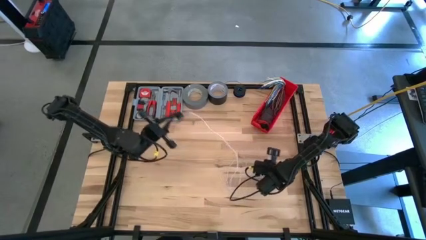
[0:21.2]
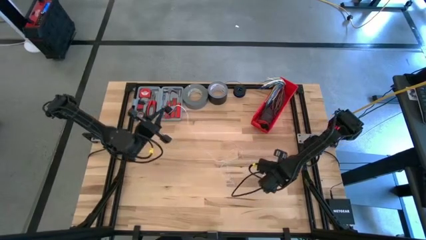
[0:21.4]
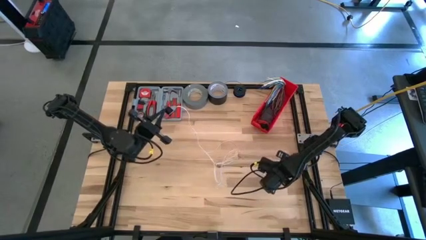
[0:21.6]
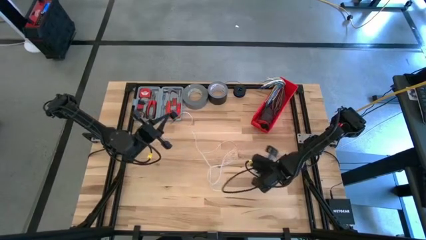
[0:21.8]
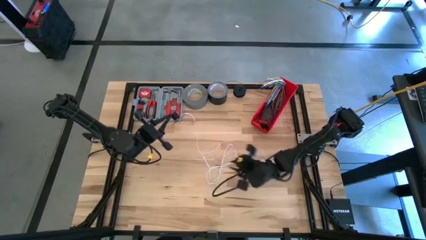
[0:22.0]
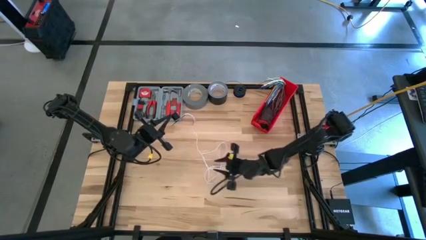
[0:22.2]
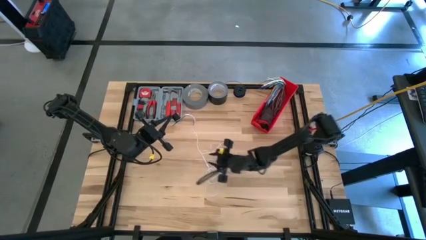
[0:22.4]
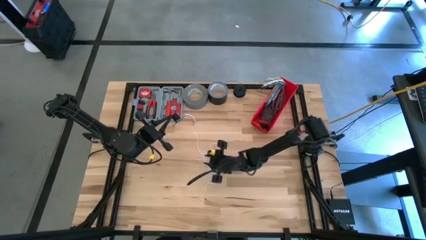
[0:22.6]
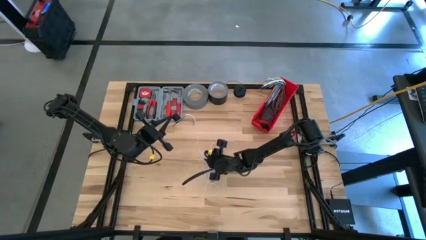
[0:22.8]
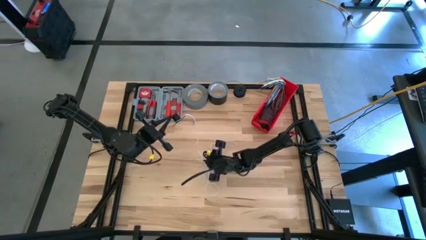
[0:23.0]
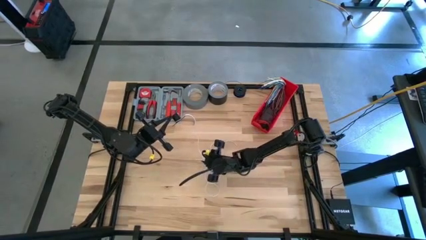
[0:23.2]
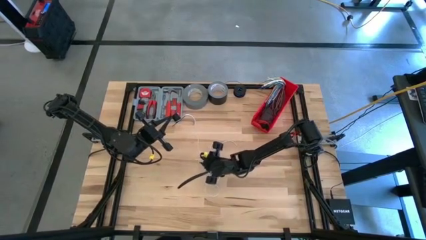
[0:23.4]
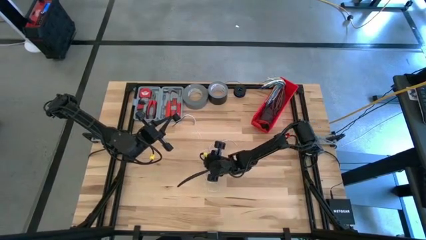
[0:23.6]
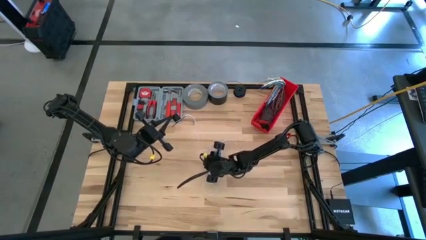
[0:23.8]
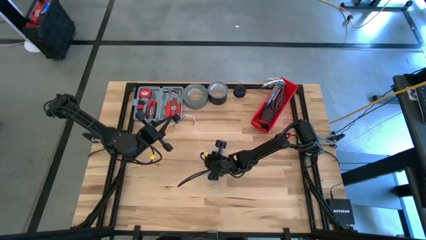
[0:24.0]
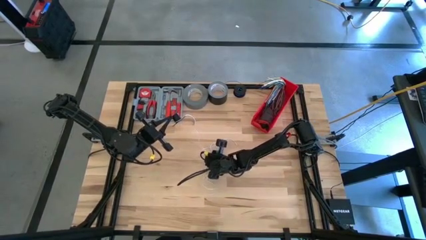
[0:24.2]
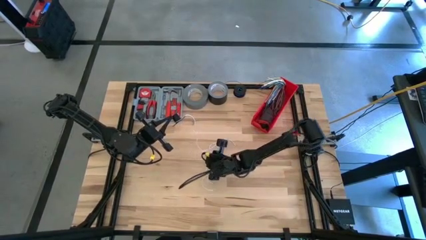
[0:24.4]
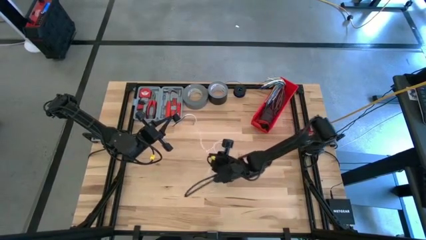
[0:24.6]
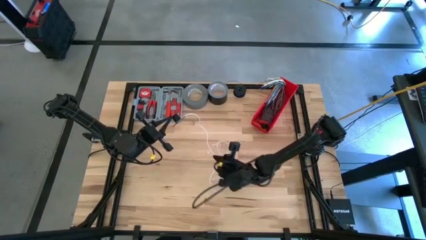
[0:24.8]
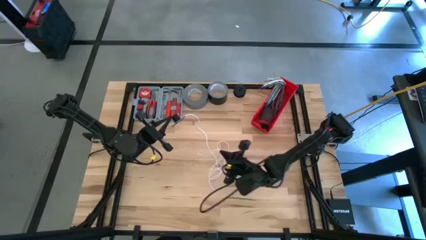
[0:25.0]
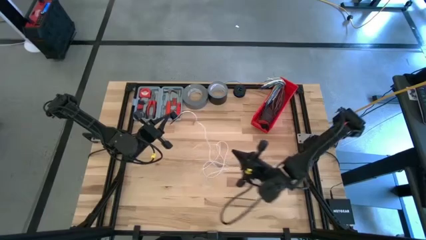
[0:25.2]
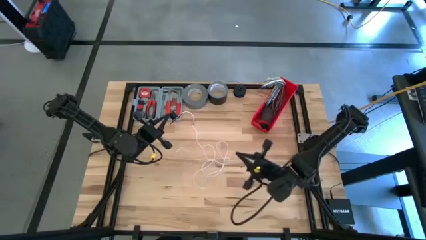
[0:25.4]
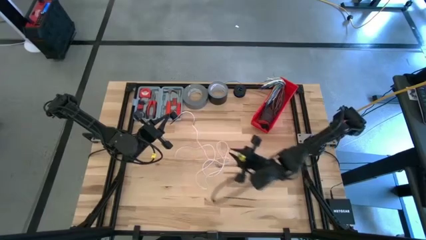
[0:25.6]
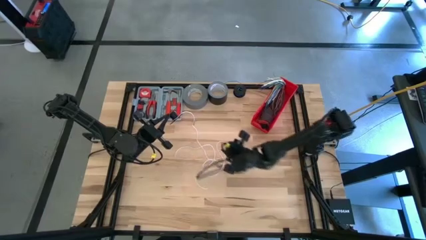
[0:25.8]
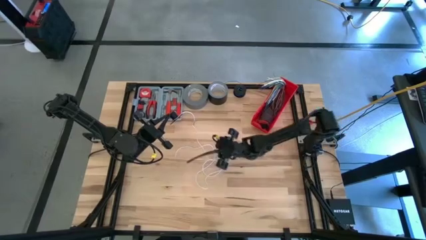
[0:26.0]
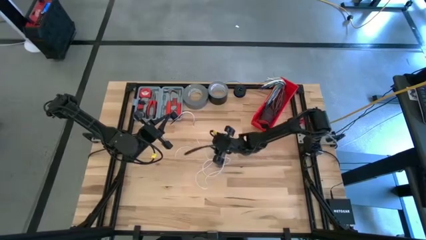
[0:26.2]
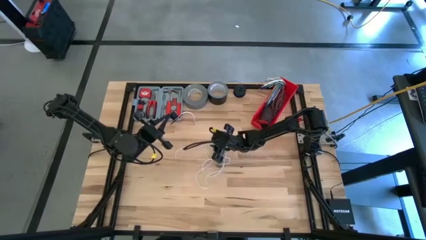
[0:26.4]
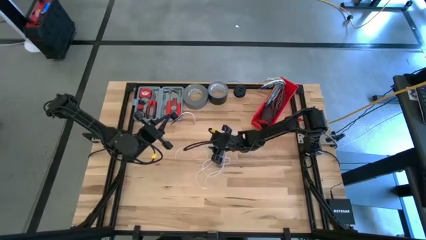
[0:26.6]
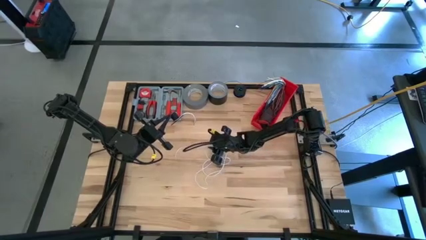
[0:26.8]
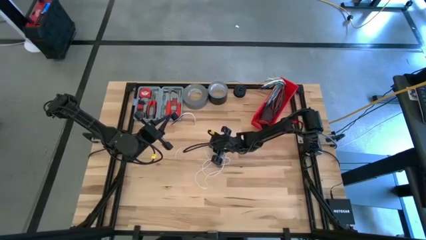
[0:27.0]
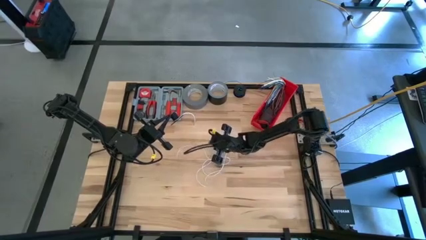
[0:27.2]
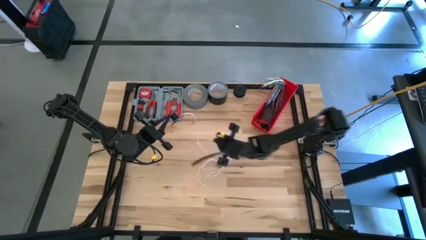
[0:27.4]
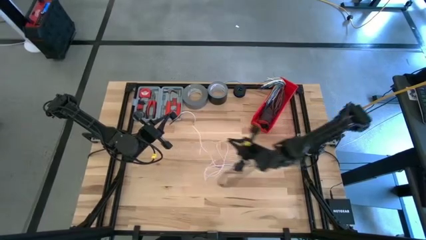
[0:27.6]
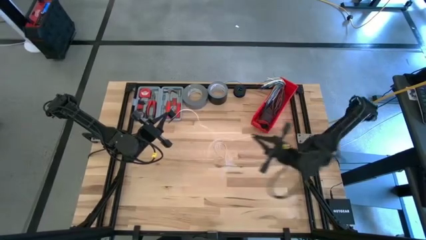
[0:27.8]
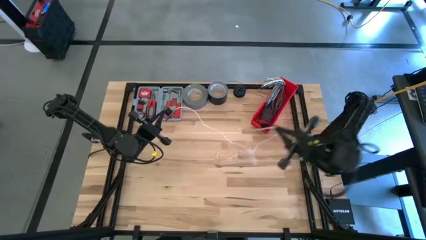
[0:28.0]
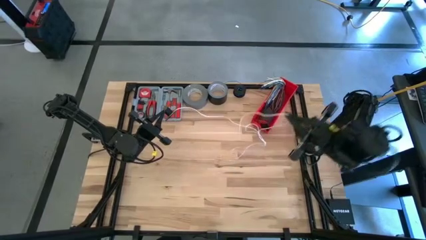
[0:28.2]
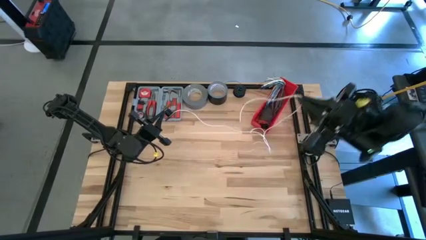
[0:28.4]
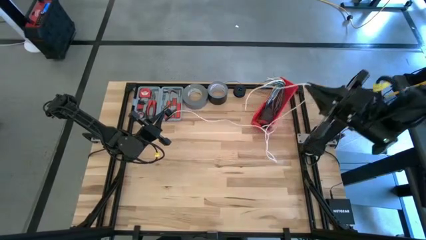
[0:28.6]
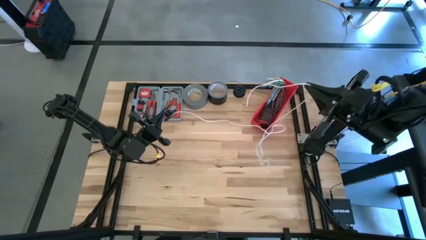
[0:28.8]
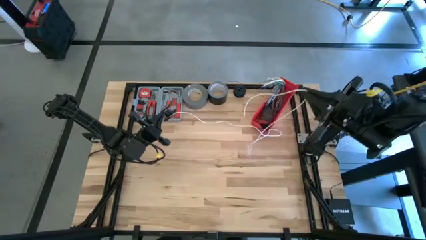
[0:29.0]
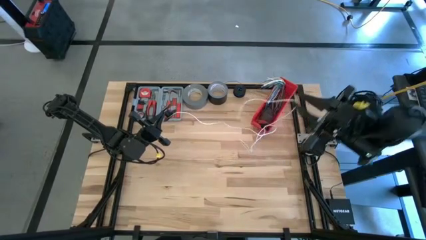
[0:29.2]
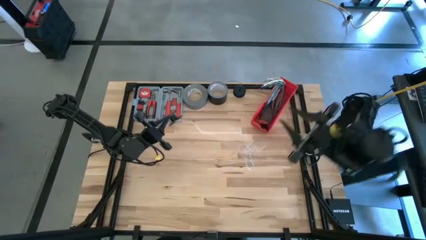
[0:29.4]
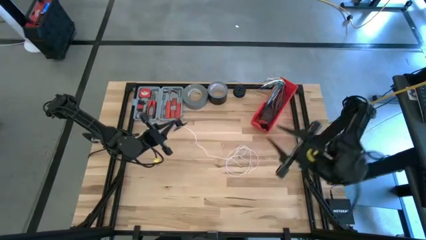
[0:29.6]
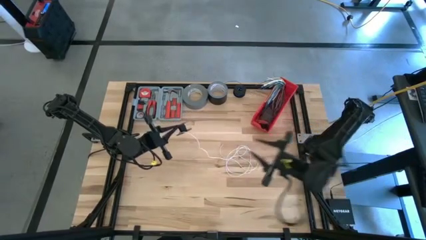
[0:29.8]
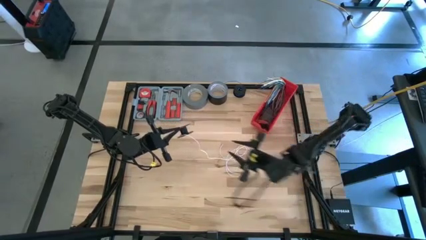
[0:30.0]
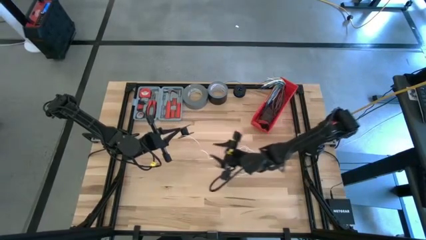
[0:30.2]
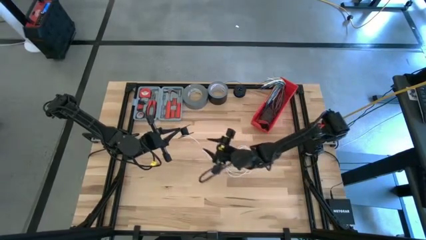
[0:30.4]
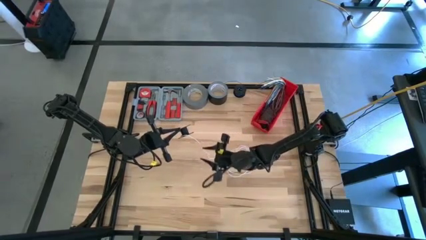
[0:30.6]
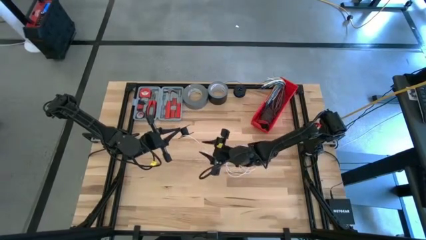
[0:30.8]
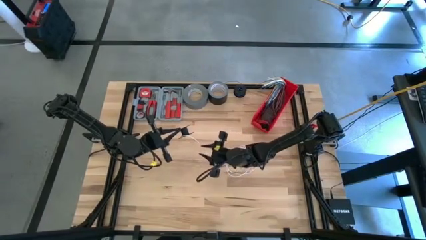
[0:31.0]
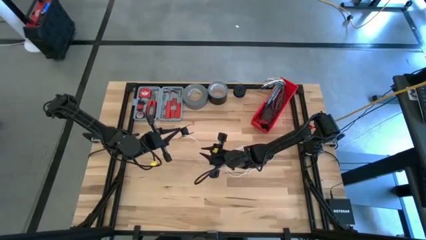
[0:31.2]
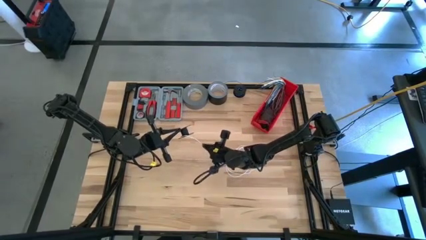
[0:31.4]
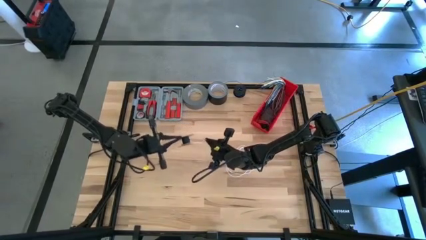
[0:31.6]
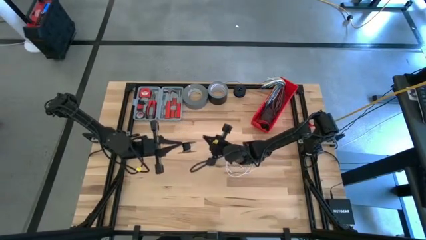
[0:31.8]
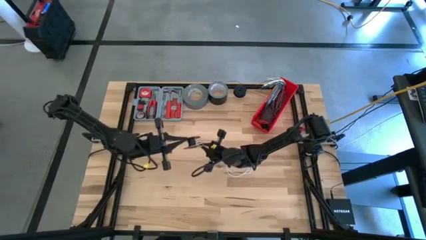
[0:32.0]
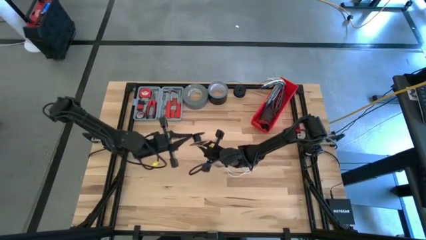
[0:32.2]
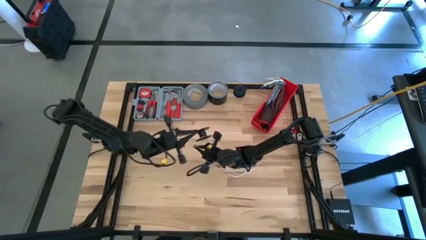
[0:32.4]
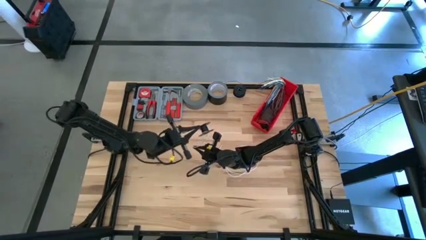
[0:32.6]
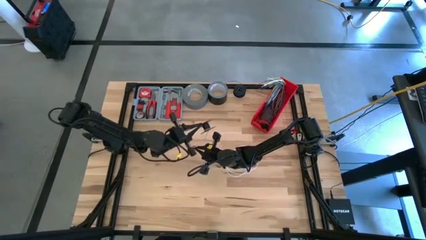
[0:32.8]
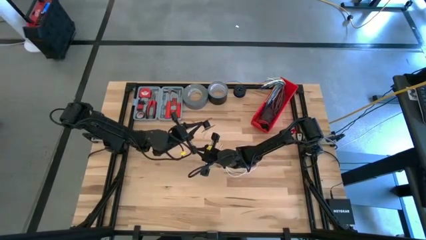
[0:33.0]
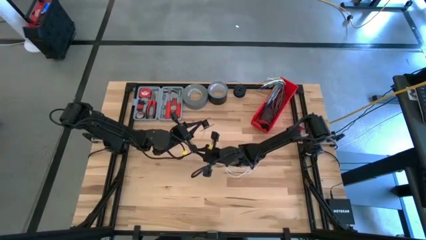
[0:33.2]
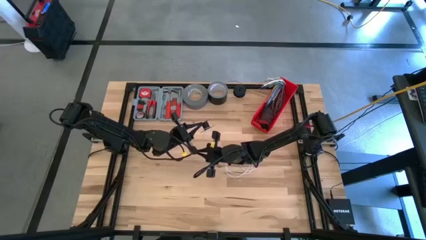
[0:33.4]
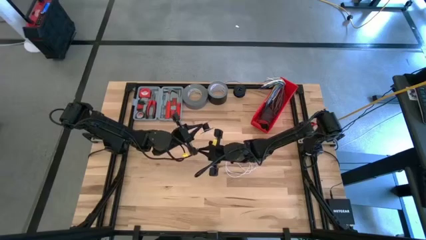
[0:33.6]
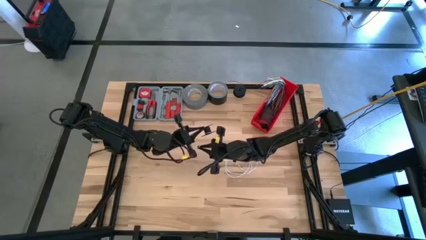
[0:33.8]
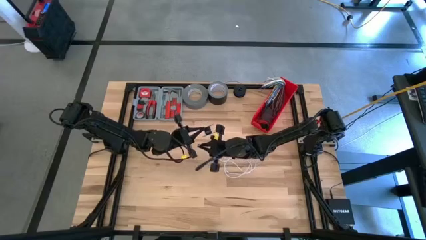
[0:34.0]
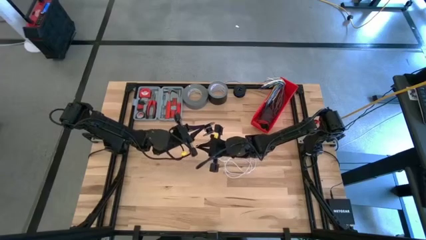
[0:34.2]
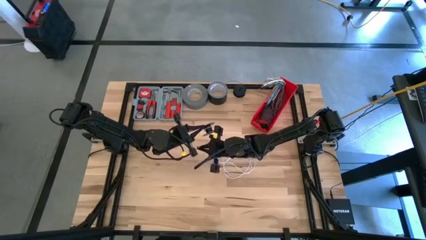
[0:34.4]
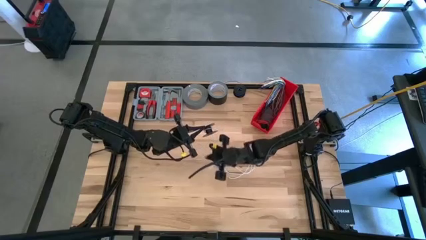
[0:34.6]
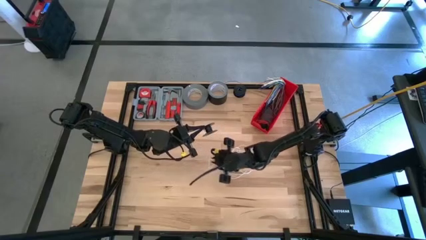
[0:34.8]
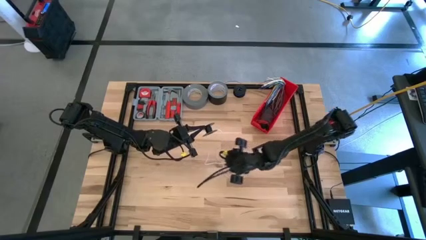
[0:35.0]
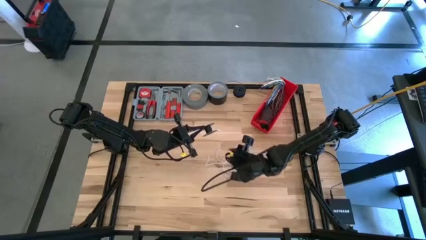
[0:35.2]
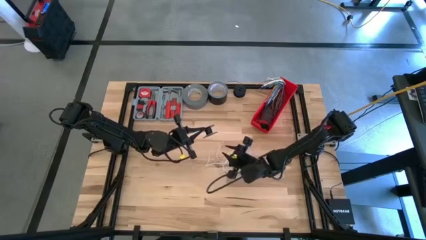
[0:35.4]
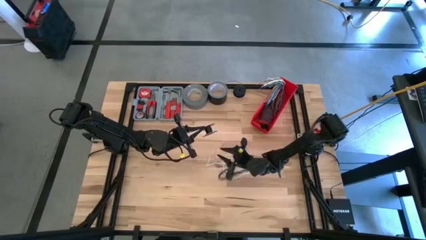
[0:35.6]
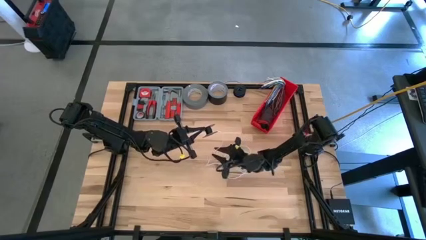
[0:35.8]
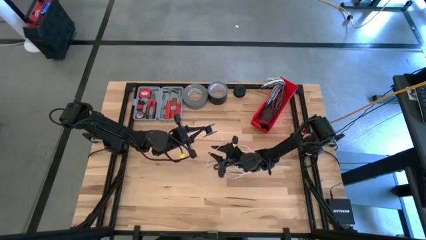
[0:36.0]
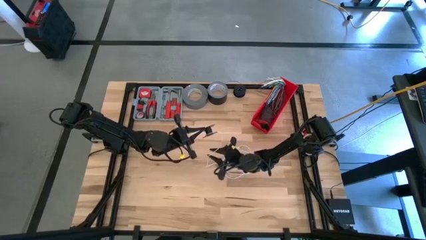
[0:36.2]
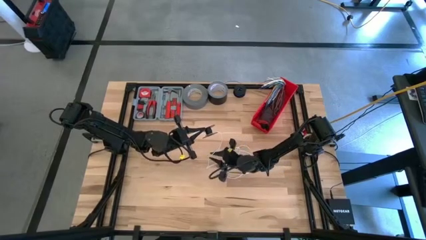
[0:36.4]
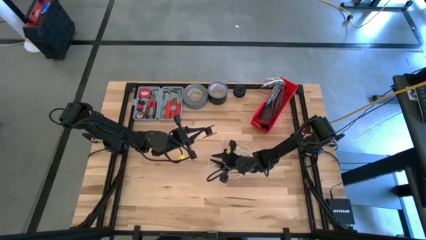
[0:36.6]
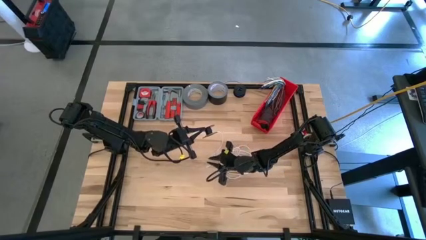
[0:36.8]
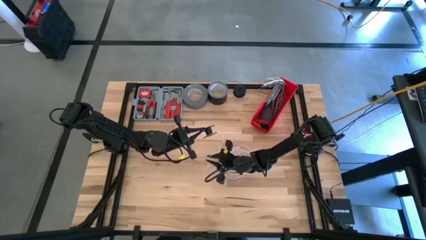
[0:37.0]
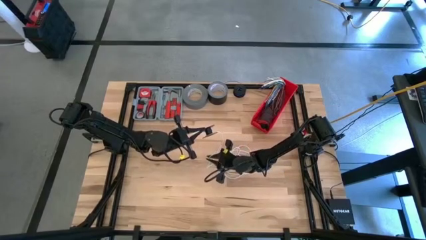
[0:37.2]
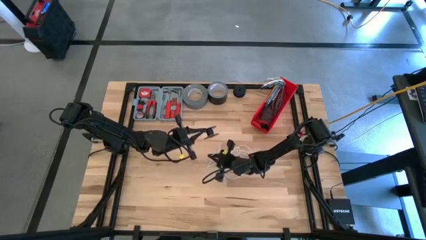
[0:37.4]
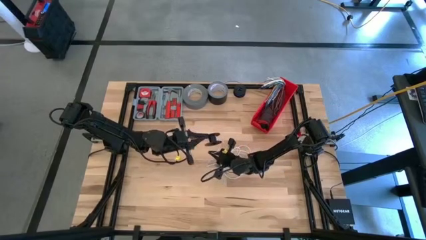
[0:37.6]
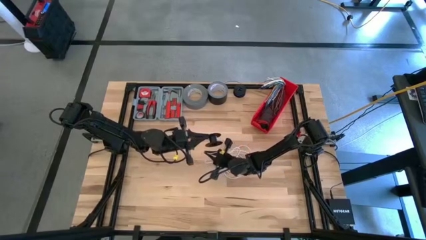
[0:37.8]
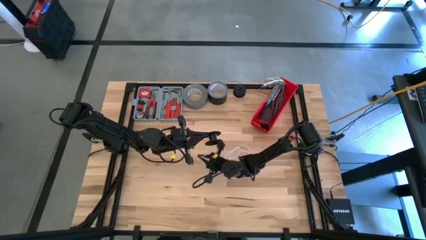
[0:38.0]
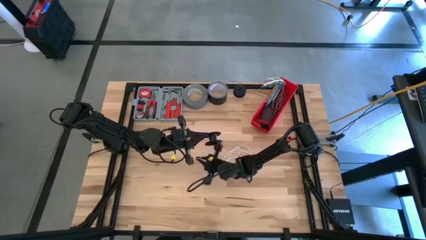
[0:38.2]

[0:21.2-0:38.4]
Task: Coil cords
Coil the white wire onto the black spool
